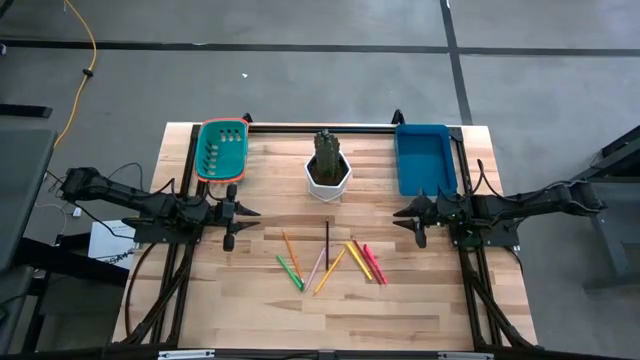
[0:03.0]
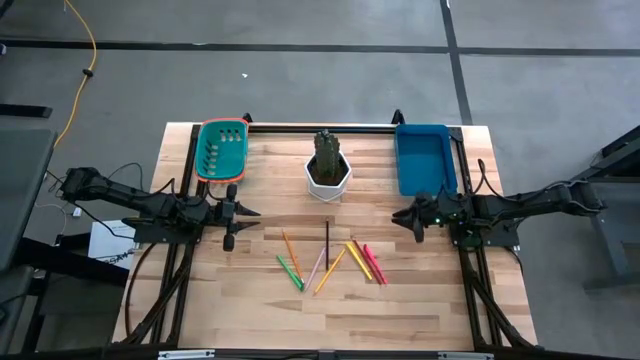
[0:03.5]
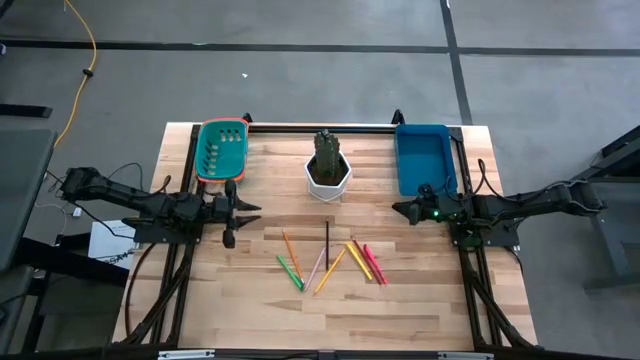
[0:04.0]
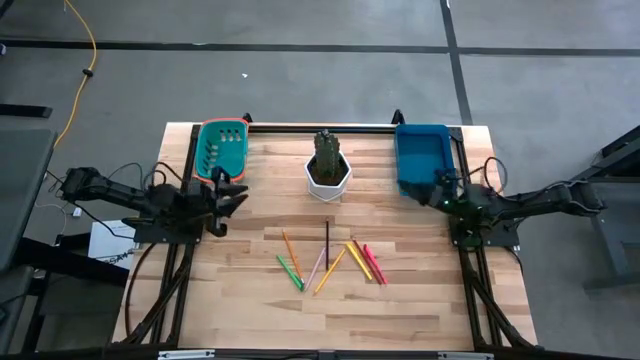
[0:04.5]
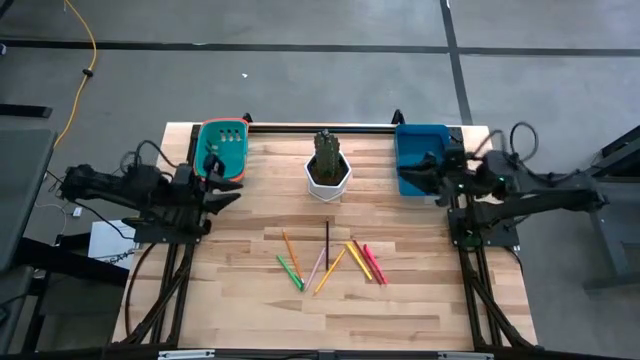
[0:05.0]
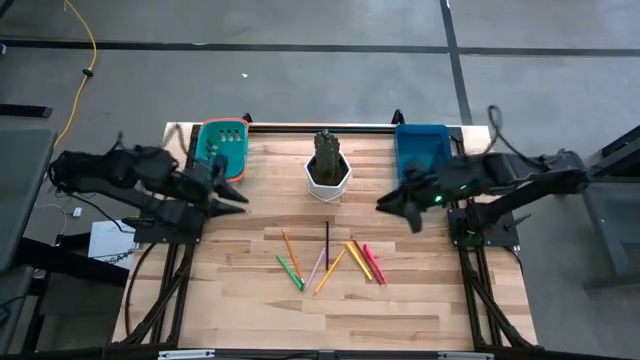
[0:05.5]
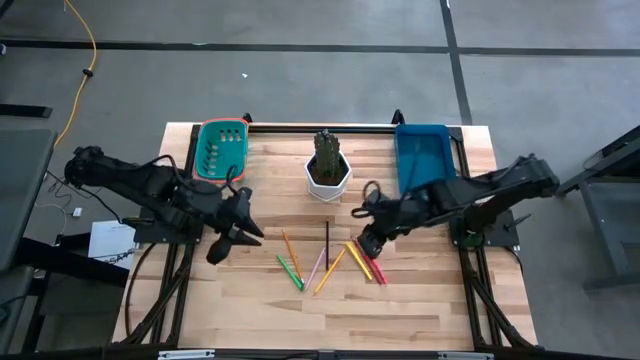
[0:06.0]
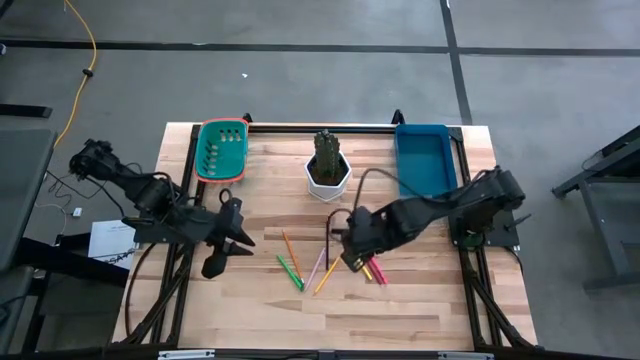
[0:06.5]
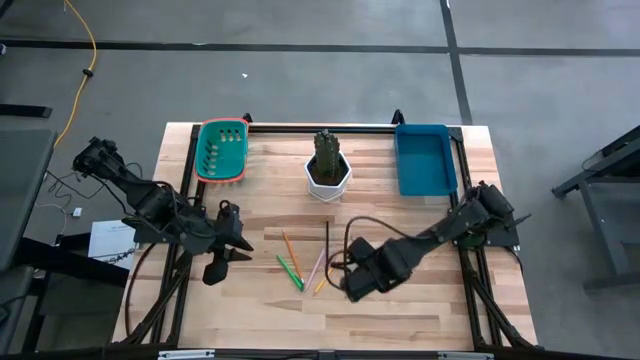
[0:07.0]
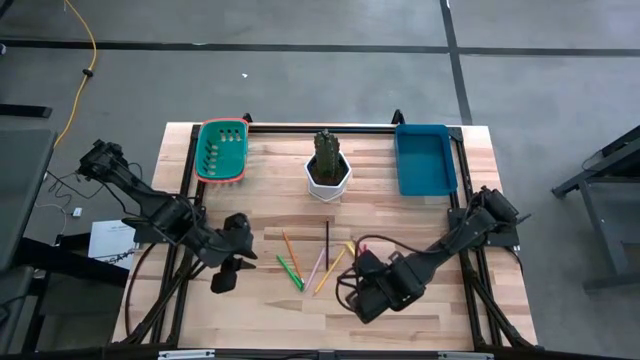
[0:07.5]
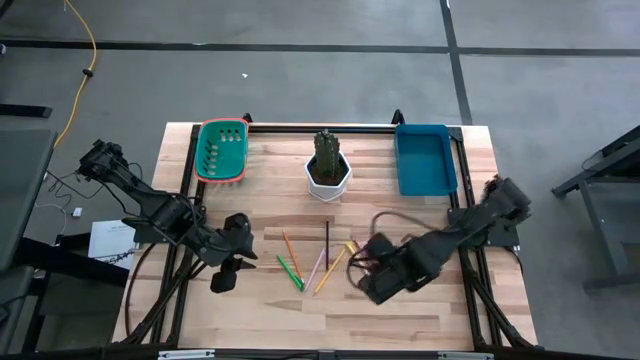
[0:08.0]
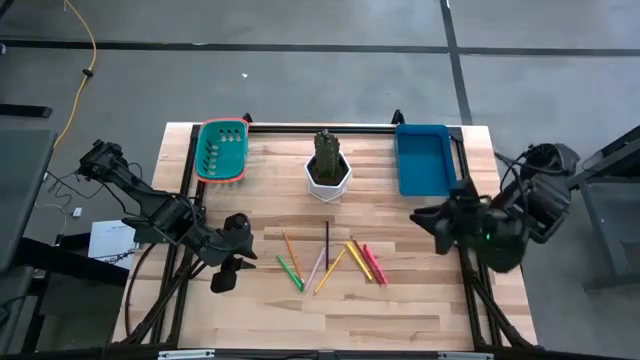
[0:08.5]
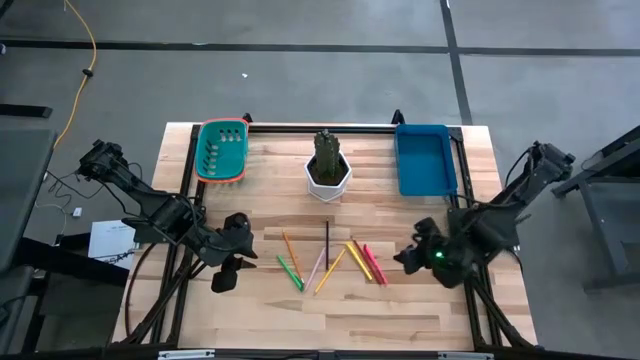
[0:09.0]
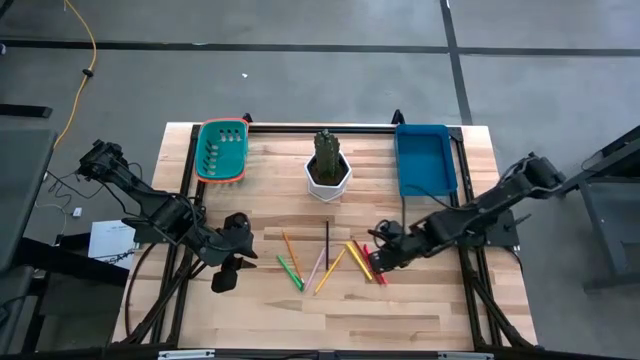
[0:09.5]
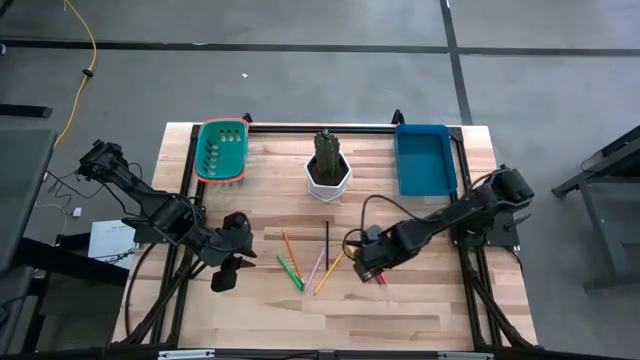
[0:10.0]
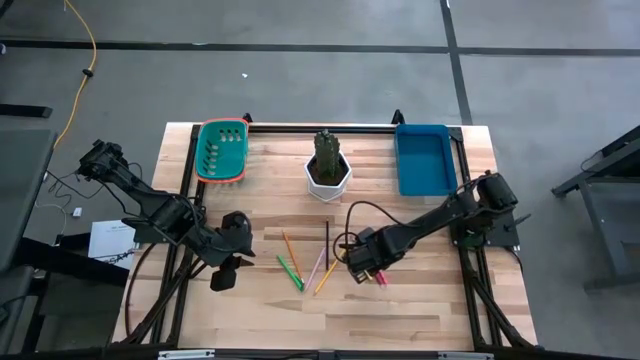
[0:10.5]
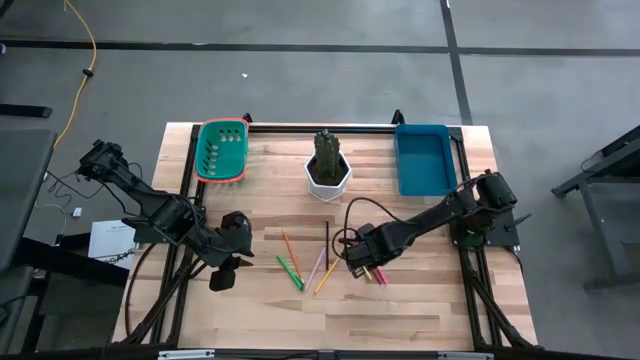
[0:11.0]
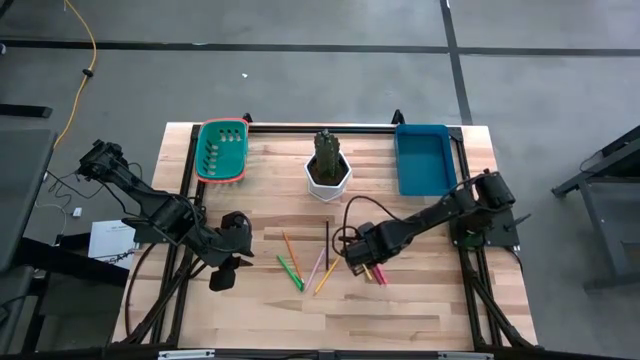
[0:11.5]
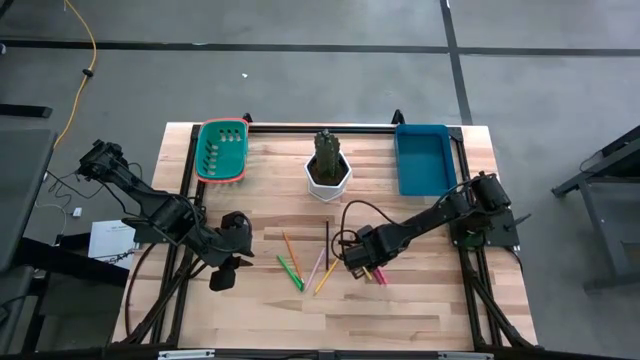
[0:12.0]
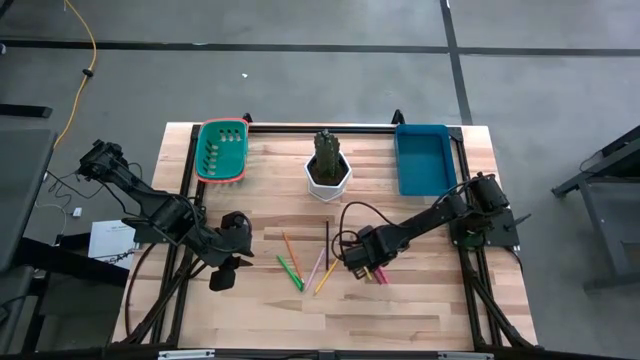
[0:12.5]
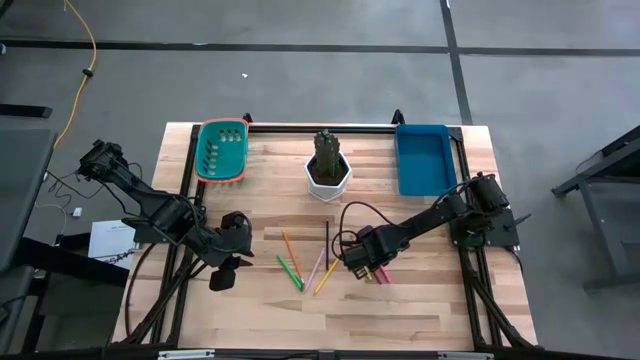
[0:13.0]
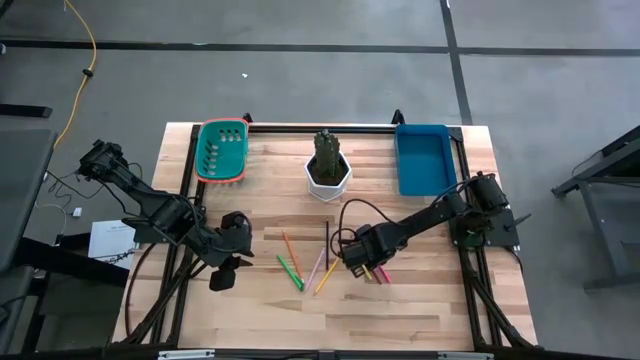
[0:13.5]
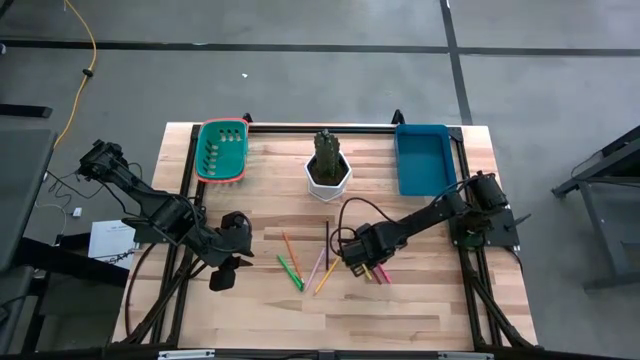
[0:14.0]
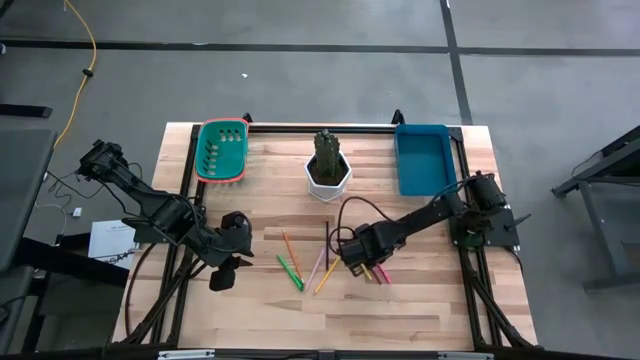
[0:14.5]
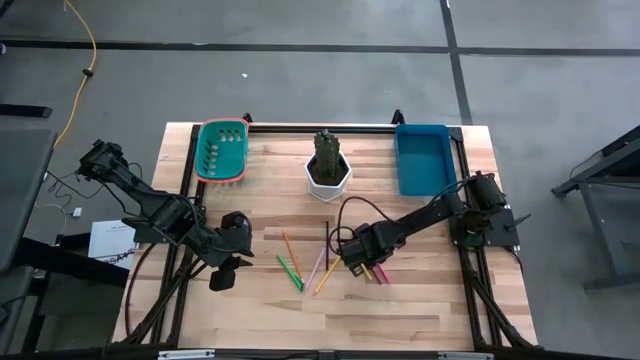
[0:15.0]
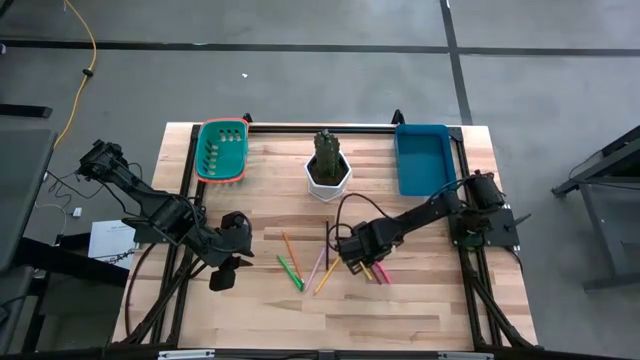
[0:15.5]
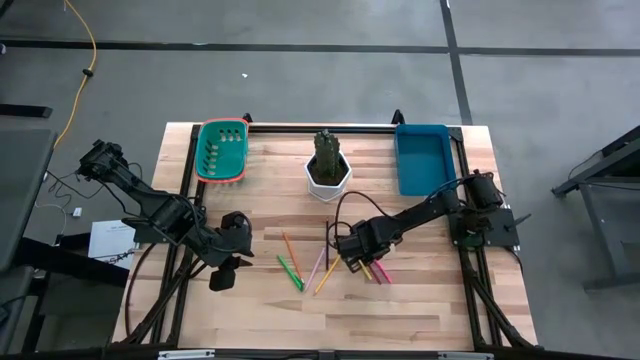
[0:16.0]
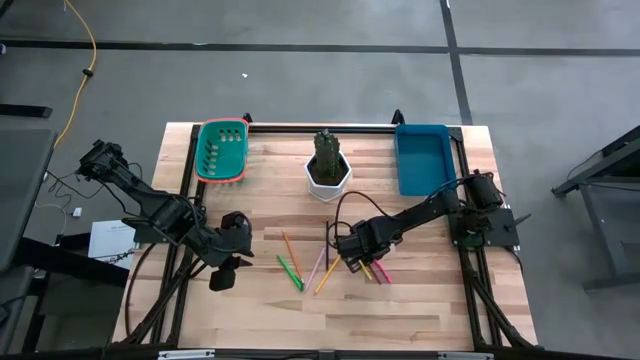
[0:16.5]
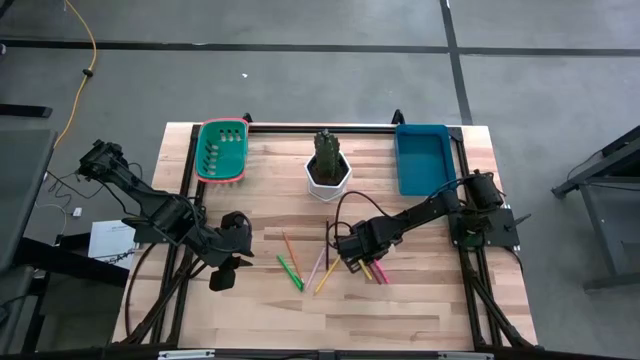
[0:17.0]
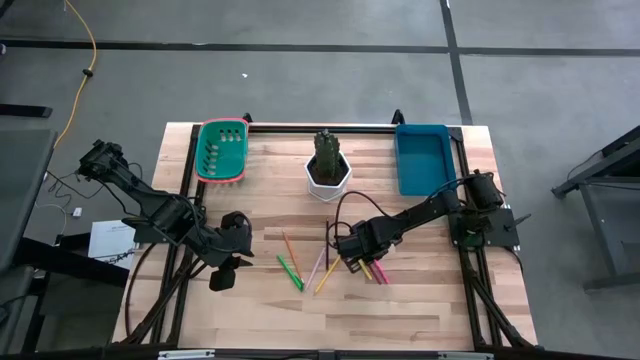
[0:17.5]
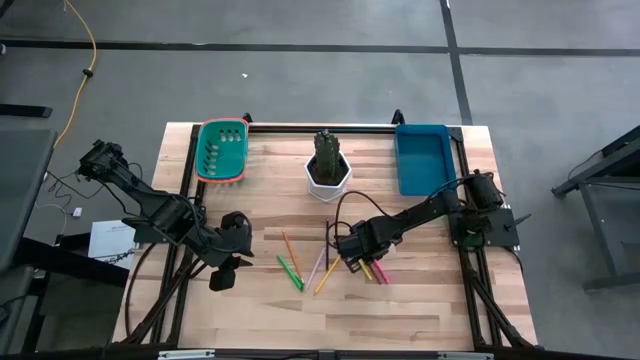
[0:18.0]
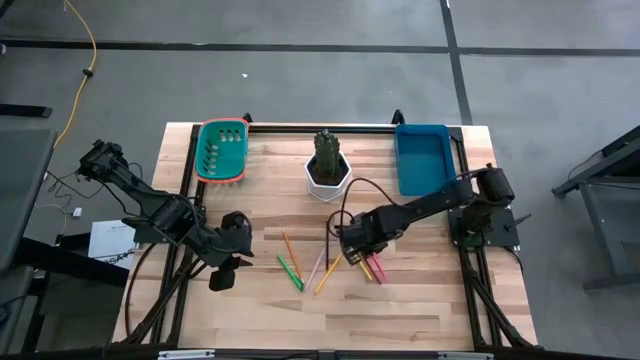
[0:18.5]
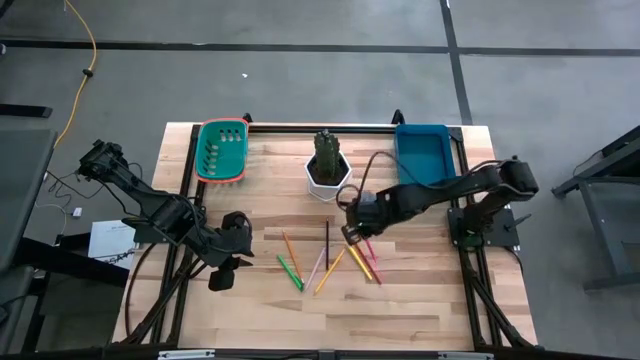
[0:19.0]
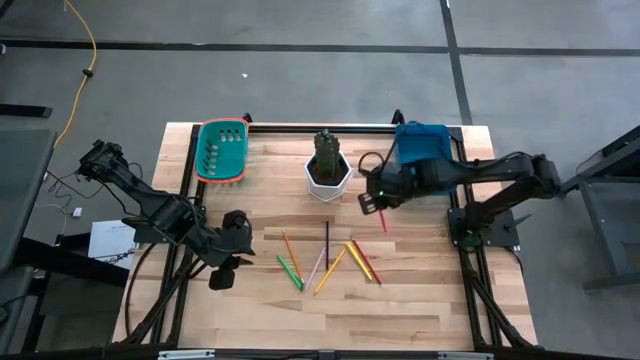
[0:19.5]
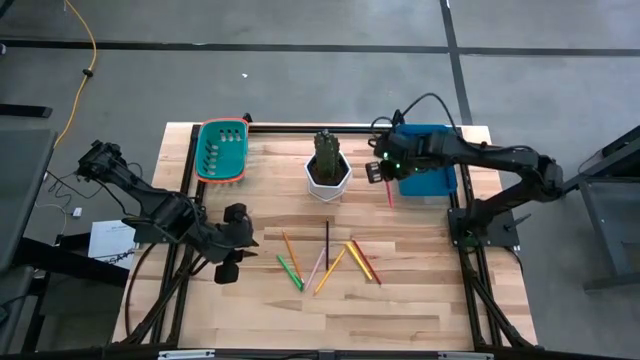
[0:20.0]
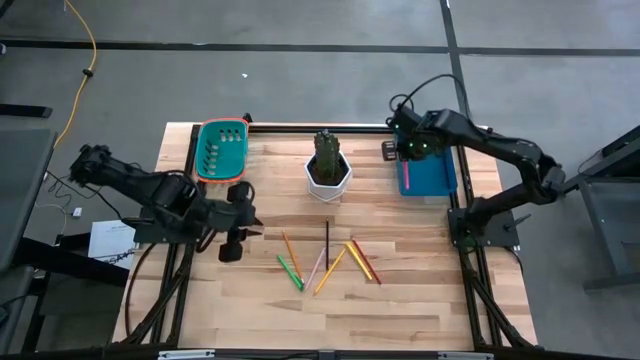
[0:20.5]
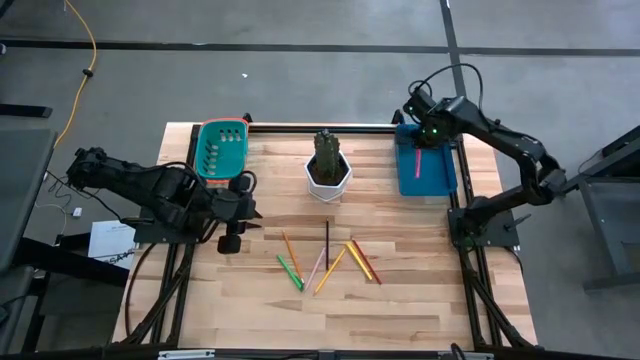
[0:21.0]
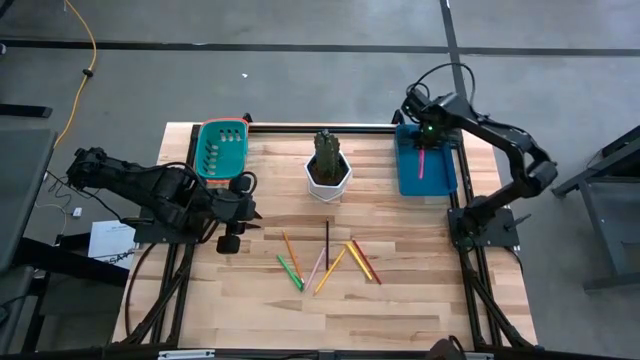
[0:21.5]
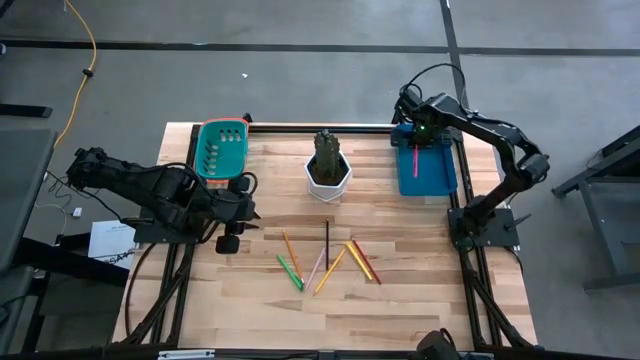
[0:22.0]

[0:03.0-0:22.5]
Task: Sort pens & pencils
Put the pink pen into the blue bin
